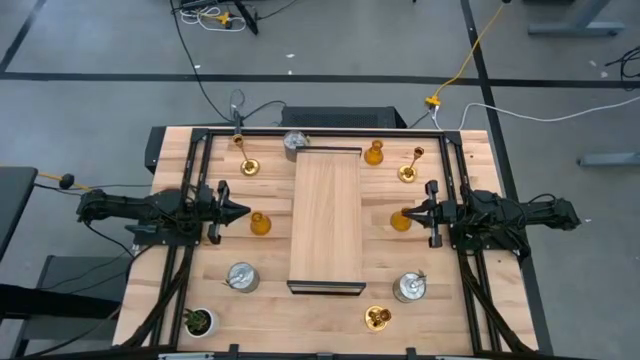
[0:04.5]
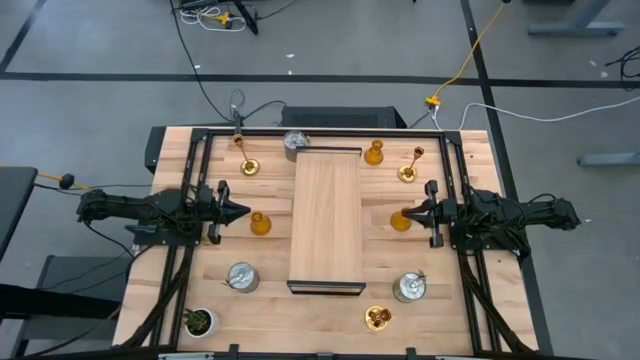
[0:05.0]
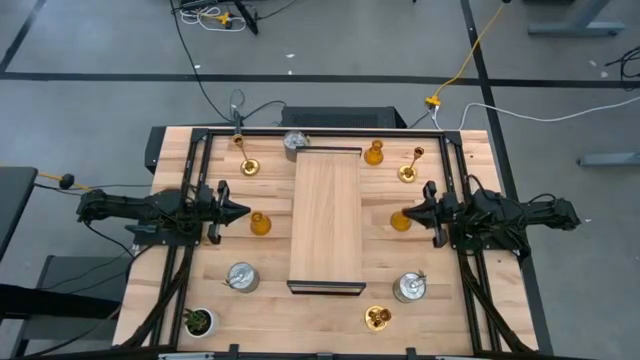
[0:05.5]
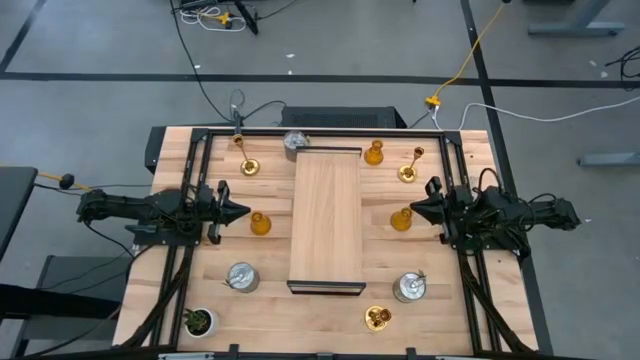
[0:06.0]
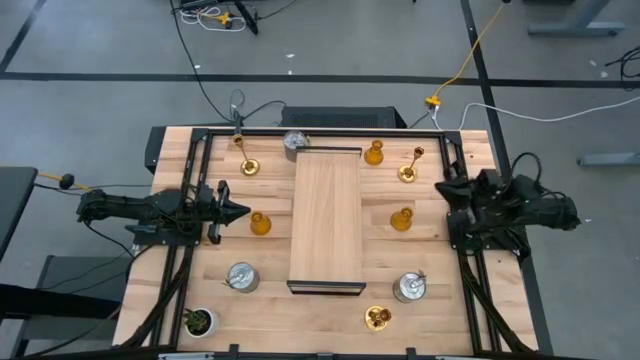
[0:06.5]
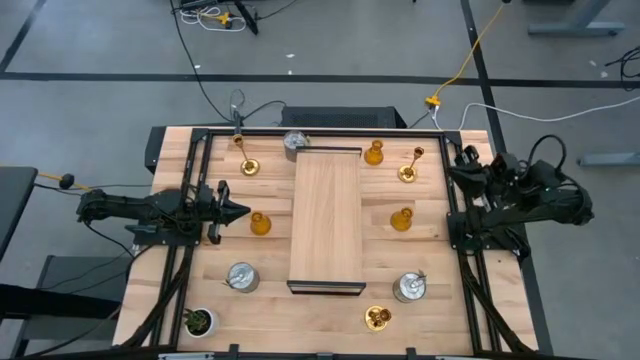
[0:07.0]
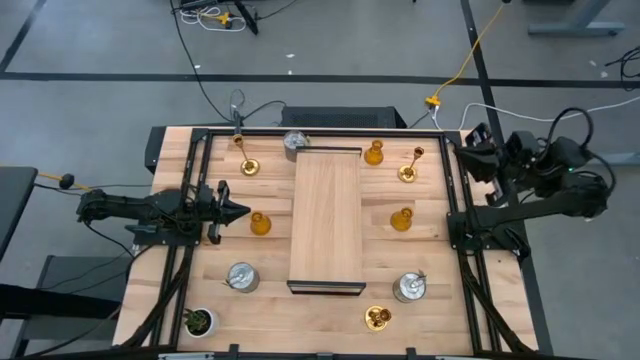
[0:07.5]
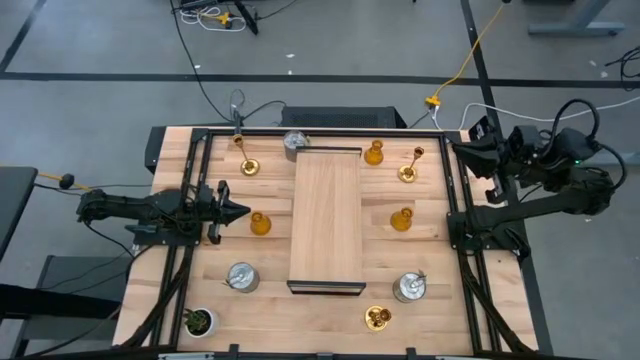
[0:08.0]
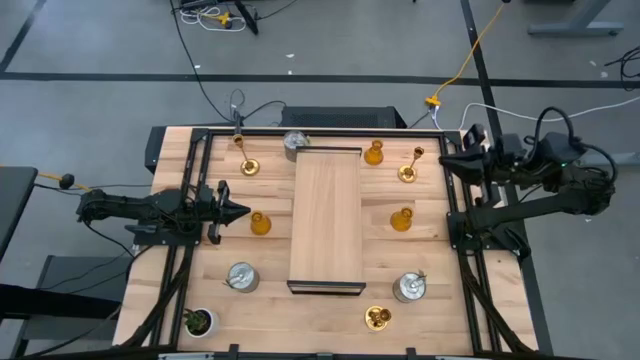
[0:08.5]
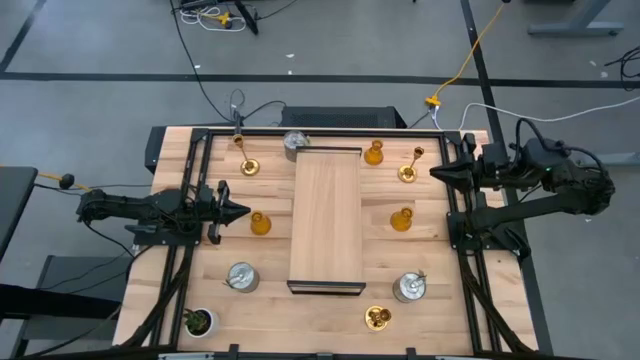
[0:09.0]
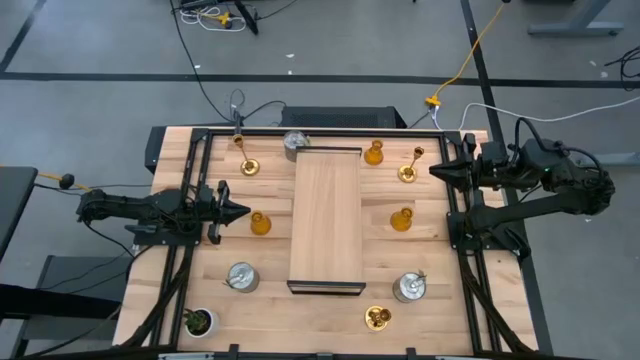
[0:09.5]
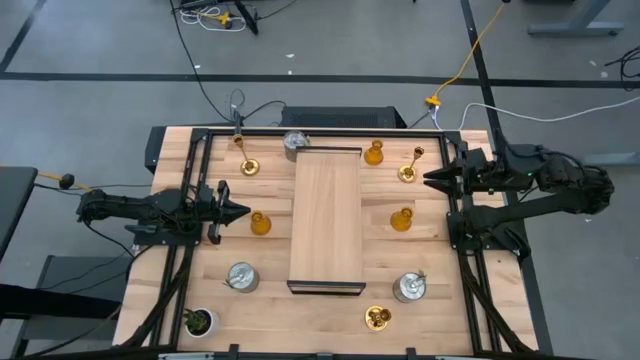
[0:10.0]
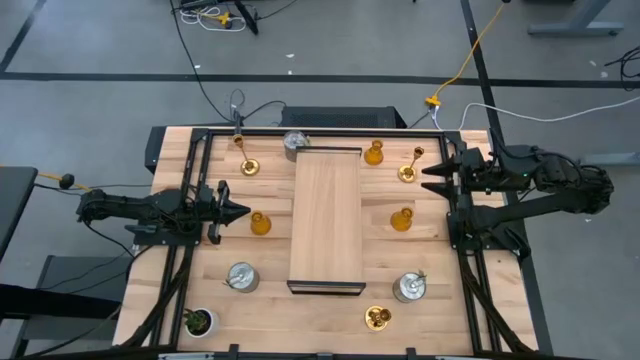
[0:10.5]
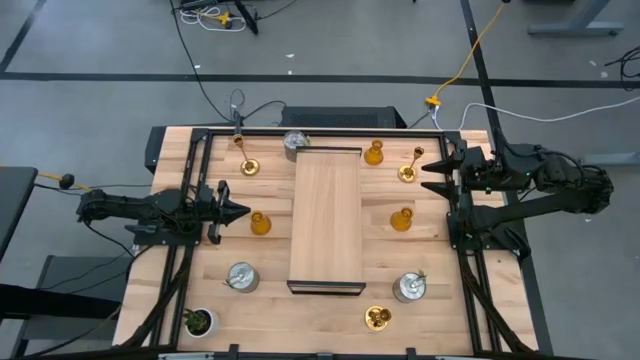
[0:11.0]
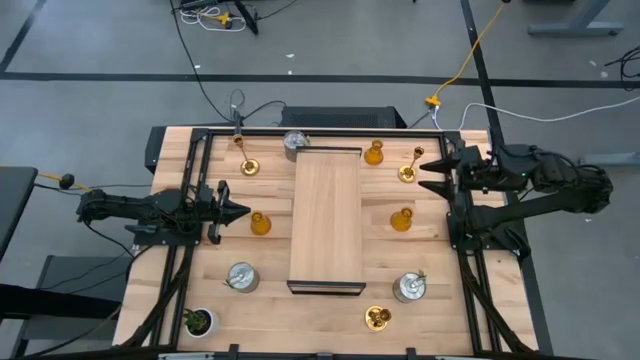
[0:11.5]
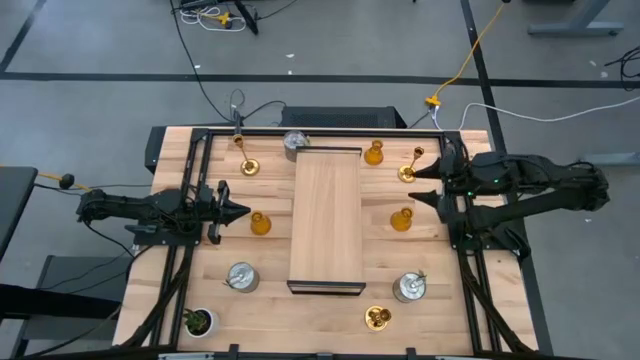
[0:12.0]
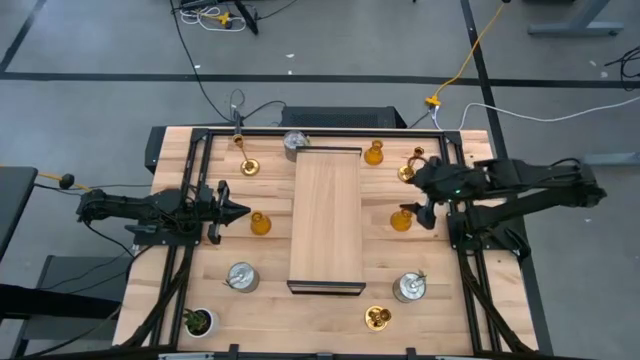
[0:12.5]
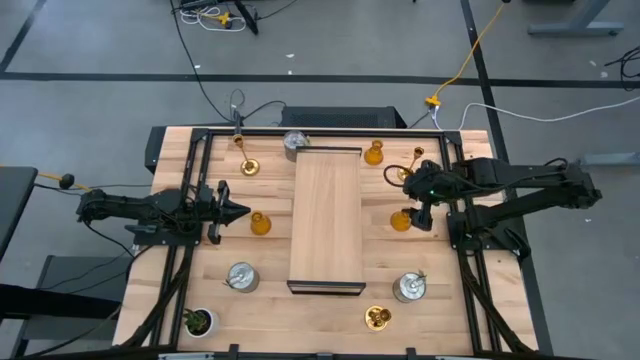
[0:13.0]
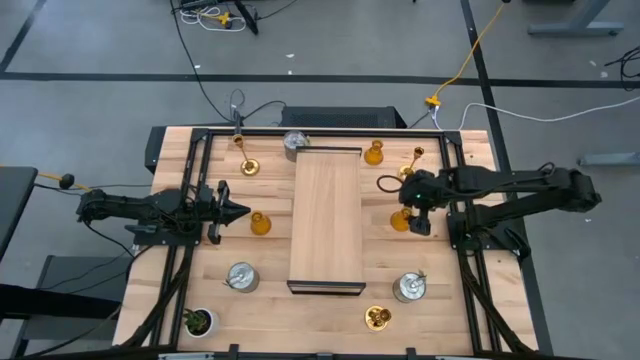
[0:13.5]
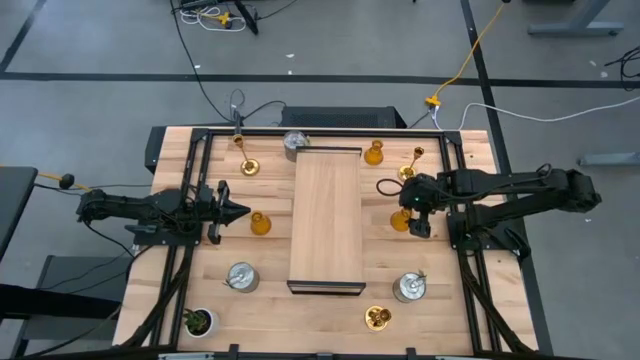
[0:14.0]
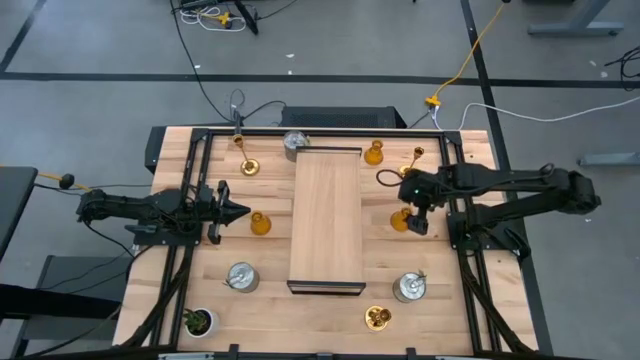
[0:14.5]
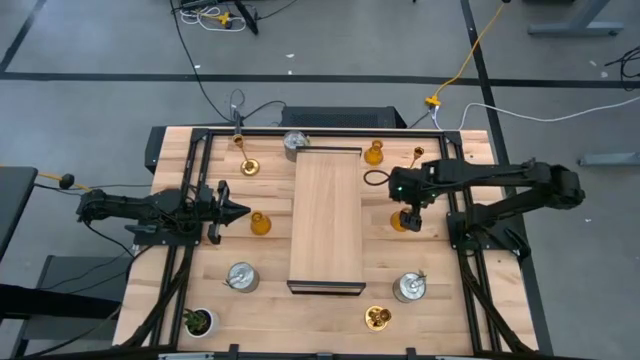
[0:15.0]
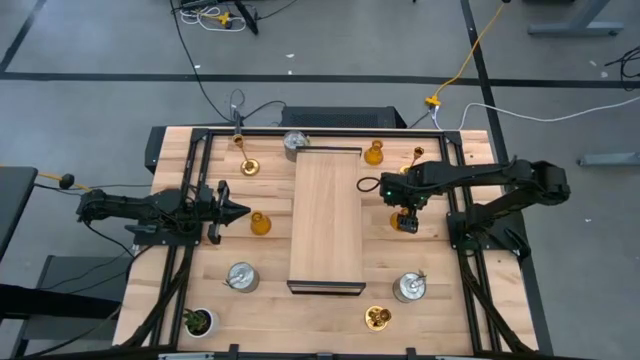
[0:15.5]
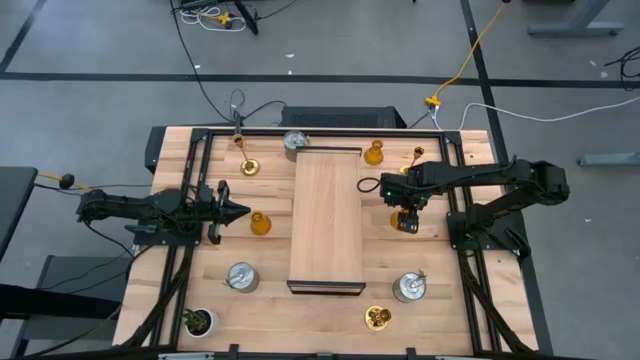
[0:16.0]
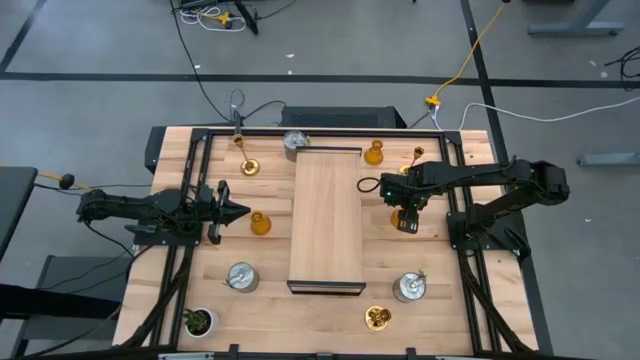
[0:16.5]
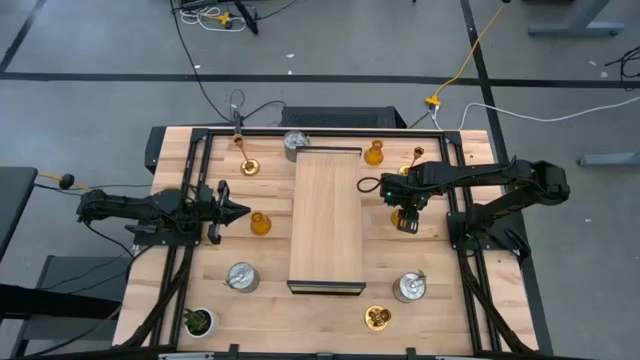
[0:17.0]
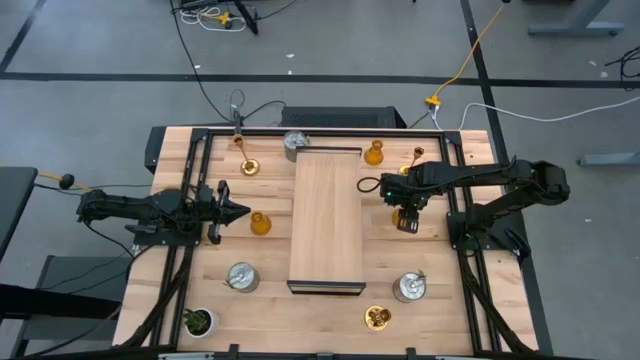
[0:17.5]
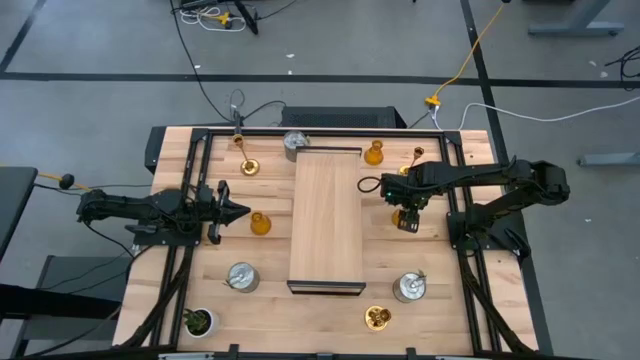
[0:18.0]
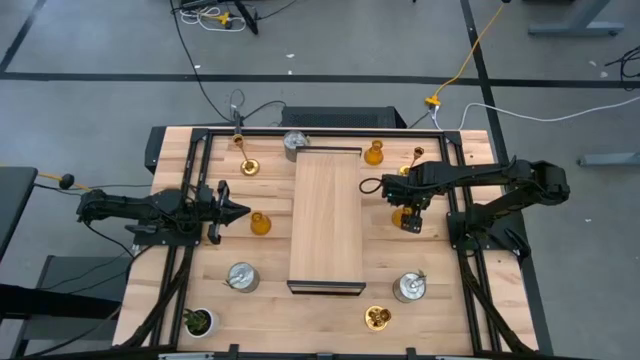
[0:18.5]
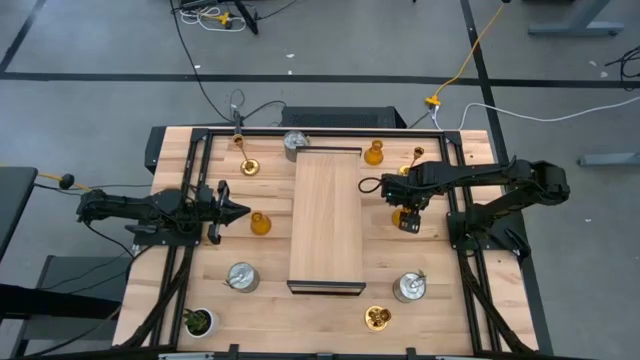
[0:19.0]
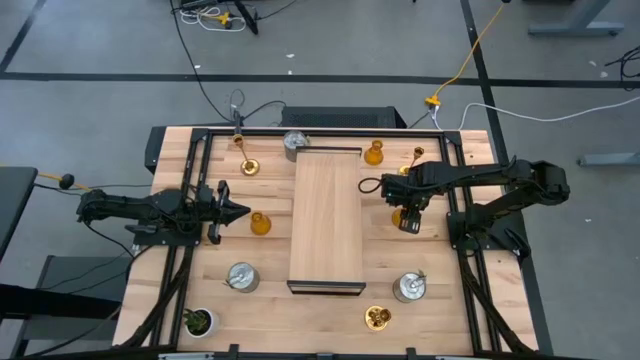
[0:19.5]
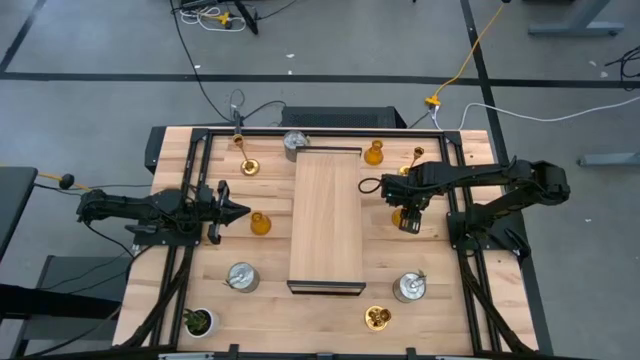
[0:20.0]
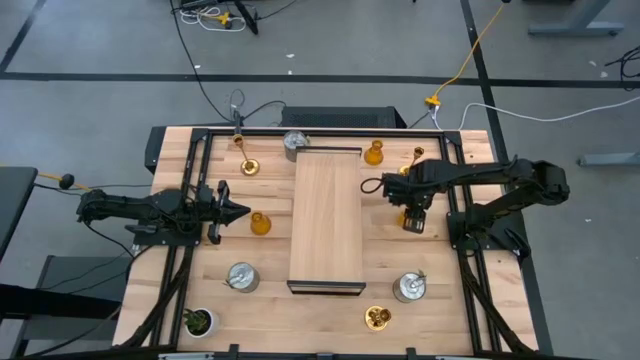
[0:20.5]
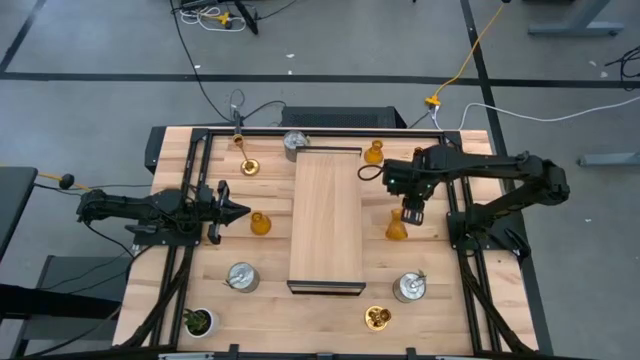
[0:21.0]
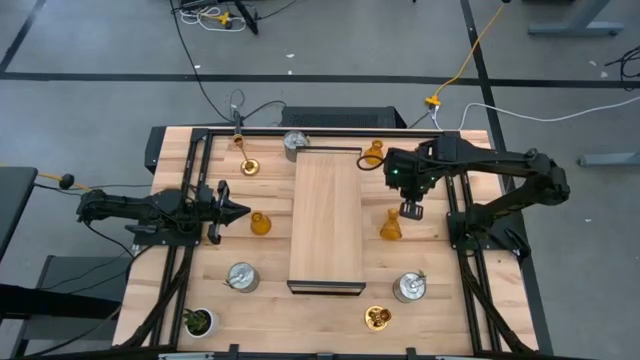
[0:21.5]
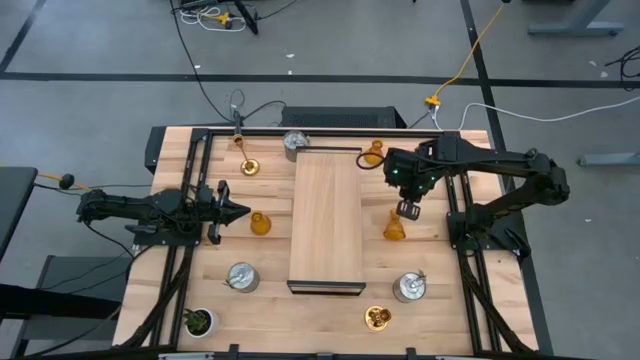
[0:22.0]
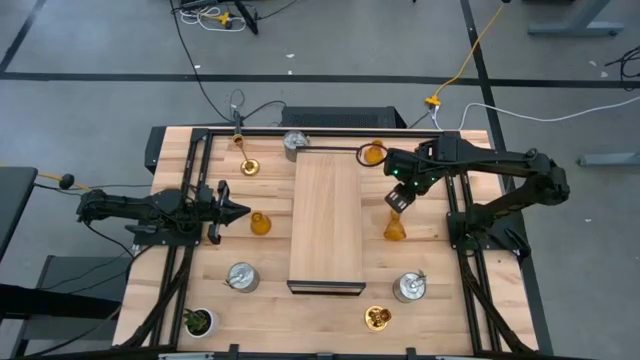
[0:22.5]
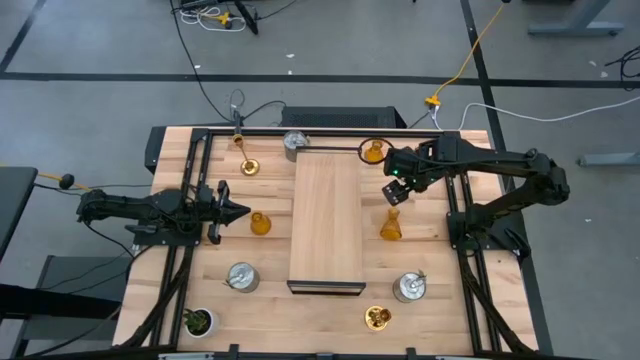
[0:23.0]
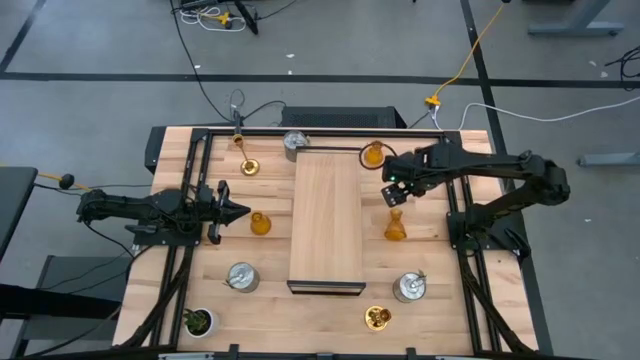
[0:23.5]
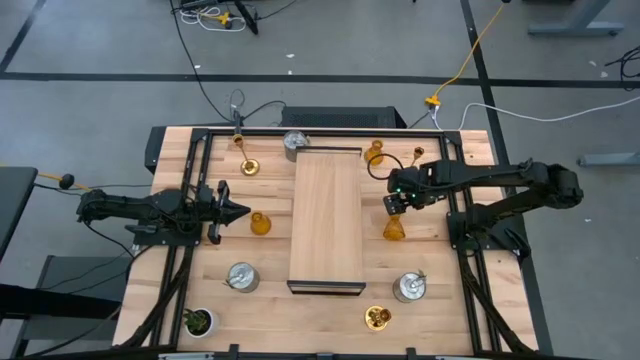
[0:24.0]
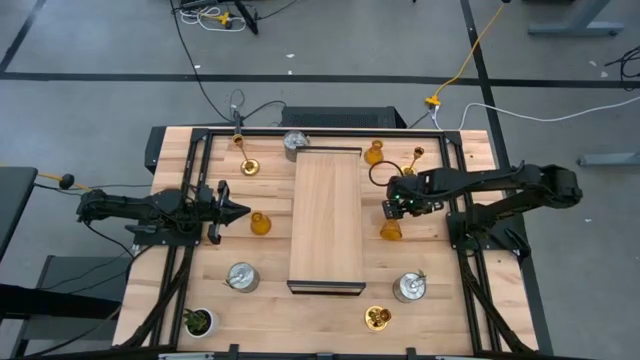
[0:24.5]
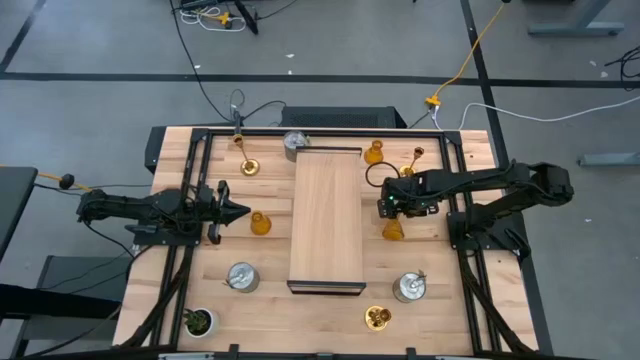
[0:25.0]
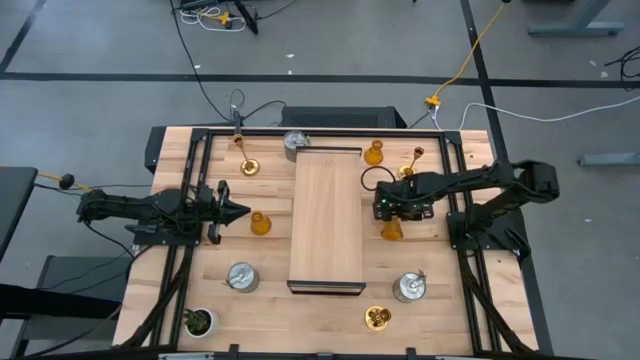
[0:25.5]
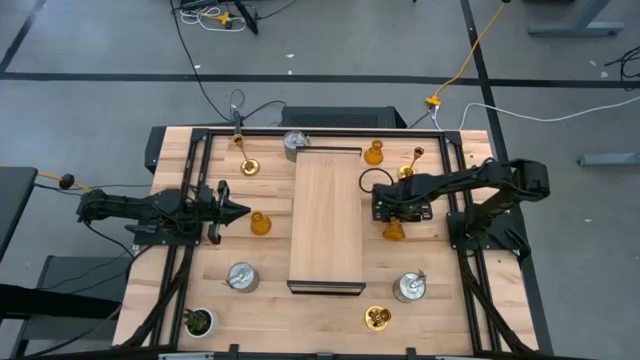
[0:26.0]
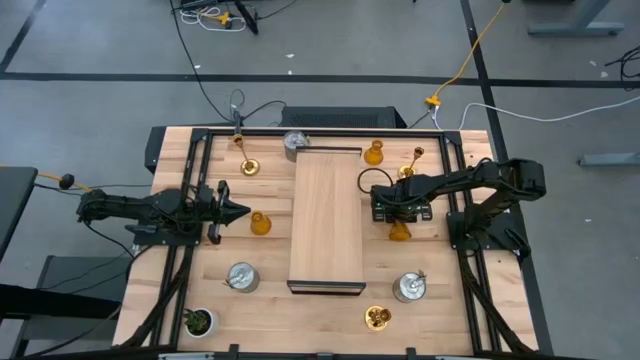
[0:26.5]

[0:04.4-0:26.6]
Task: Pick & Place candle stick holders
Put the bottom right glass candle holder on the shelf
